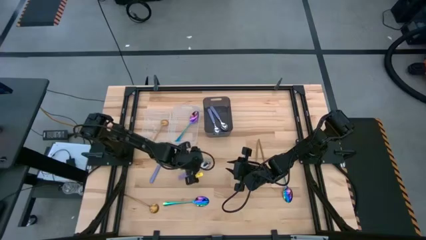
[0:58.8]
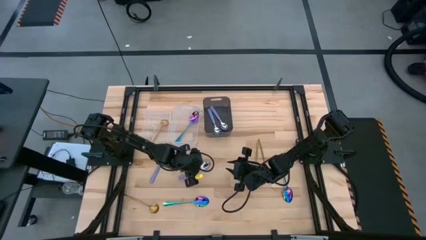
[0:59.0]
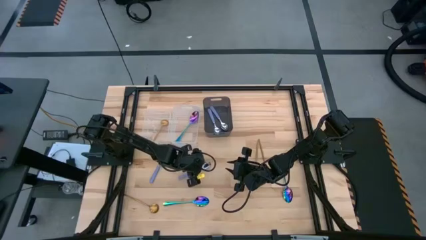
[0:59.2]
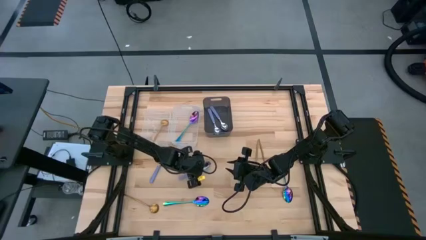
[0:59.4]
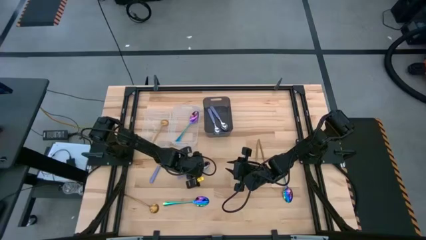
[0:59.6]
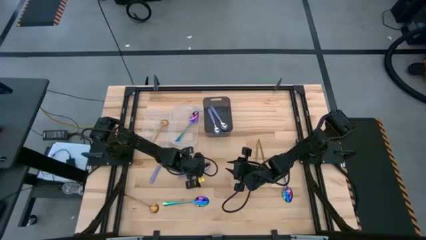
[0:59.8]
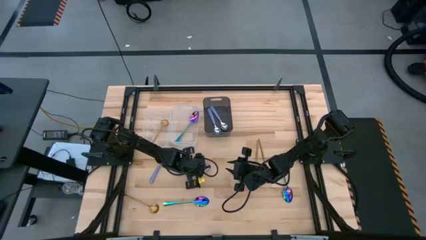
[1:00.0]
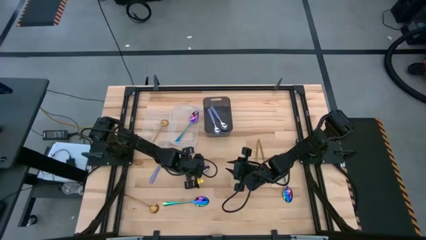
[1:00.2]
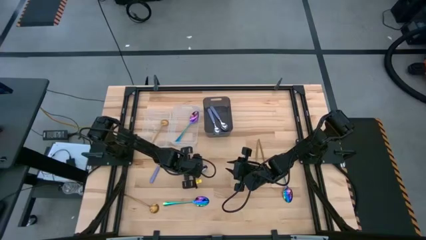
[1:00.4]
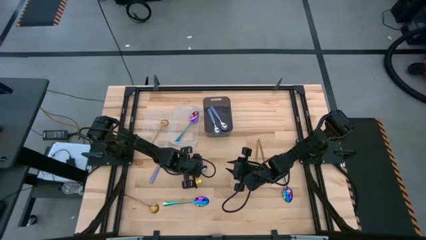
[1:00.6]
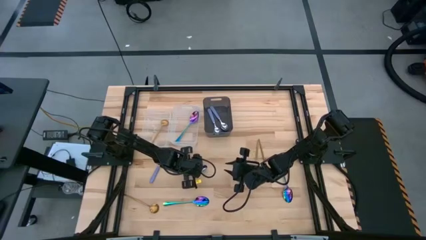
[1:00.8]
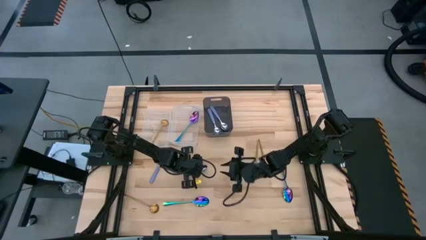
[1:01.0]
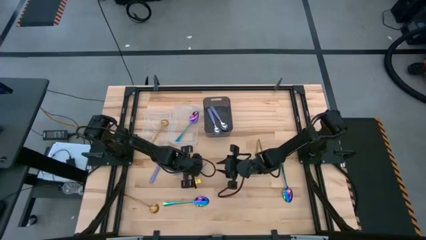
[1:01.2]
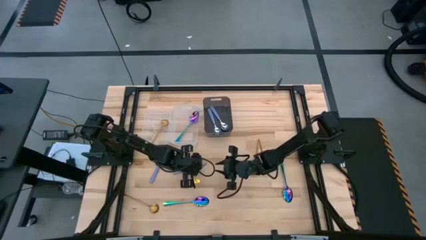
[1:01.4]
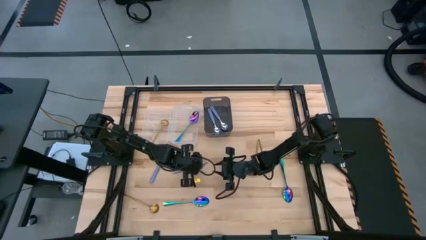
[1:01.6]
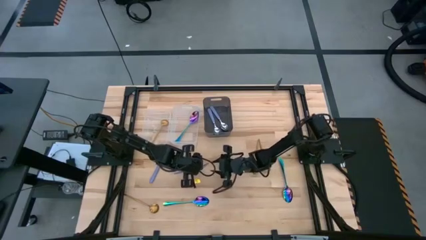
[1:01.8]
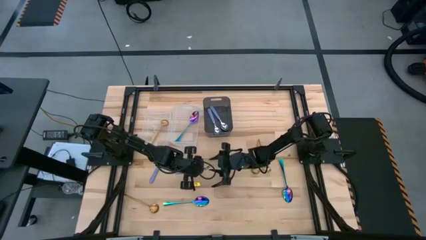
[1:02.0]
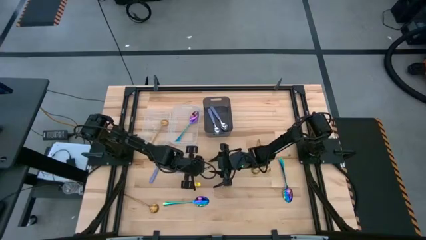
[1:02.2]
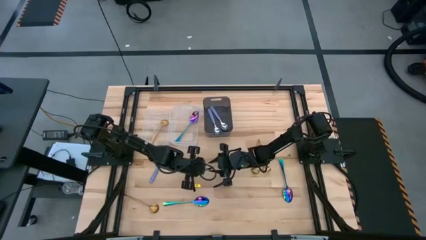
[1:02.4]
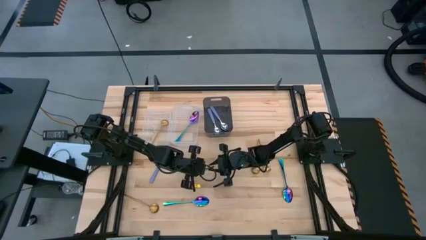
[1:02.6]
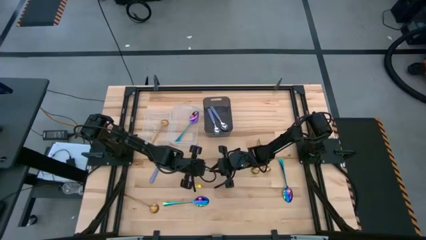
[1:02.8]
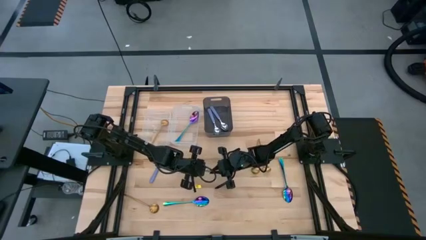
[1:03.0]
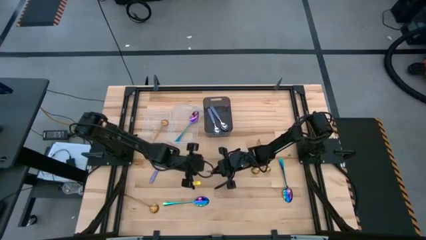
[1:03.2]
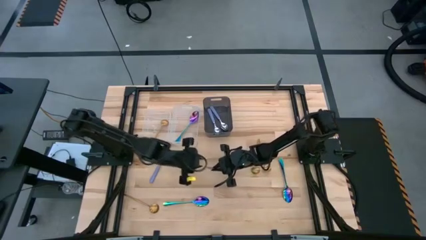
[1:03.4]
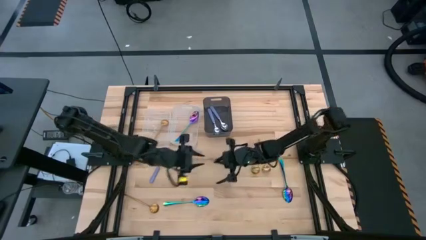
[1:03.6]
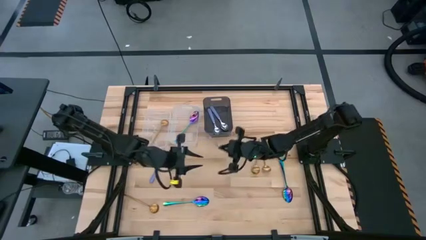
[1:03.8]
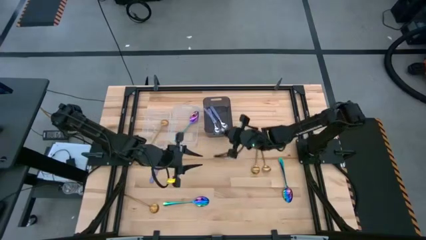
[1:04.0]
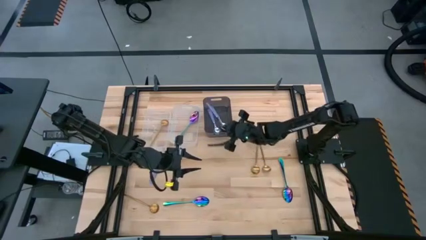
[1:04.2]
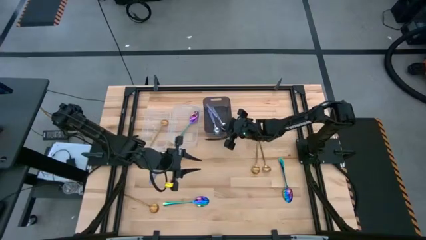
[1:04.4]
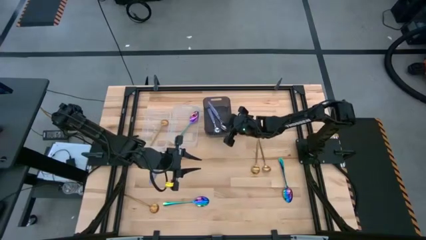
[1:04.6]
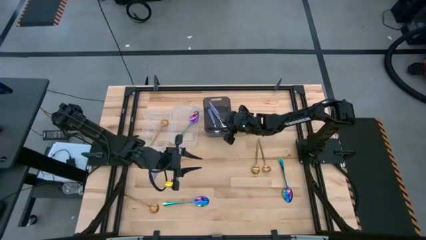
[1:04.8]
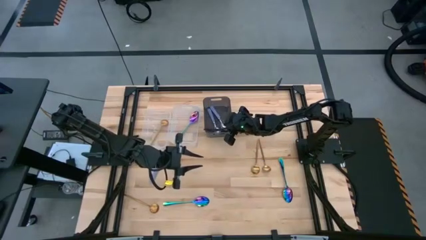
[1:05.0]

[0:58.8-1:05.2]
Task: Sort silverware by color (type)
Put the purple spoon into the black transparent bin

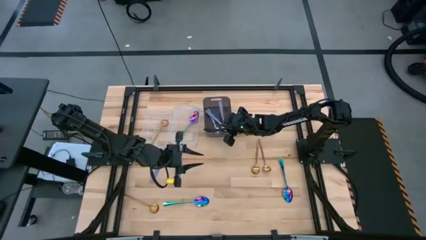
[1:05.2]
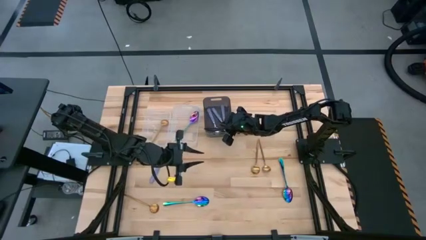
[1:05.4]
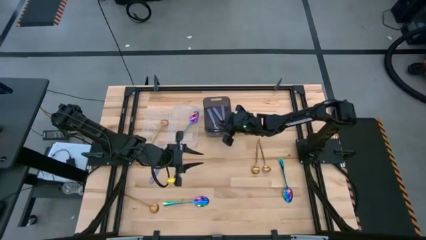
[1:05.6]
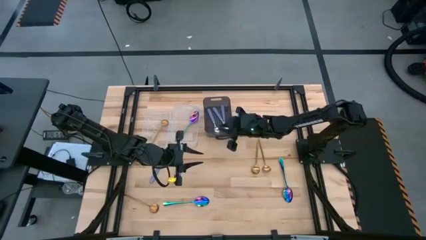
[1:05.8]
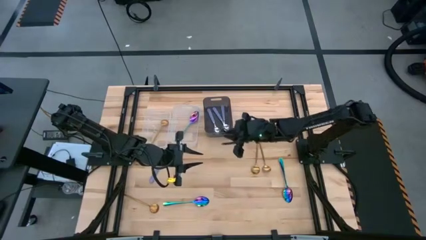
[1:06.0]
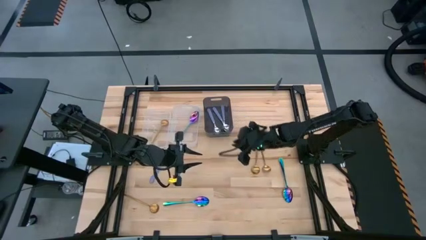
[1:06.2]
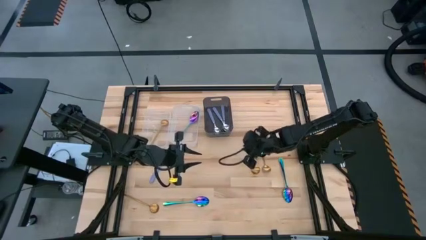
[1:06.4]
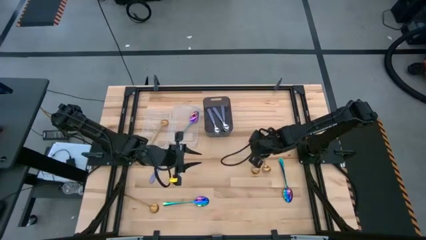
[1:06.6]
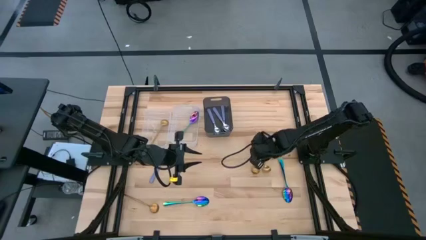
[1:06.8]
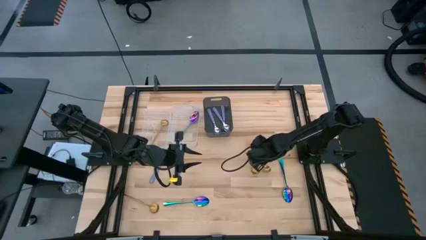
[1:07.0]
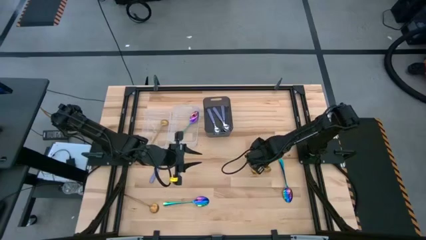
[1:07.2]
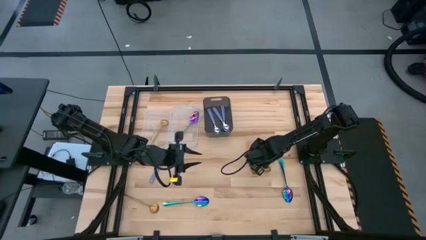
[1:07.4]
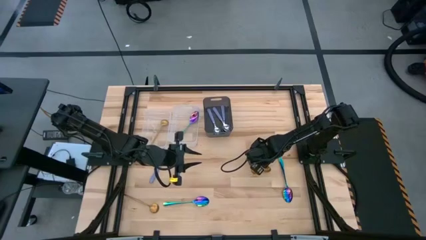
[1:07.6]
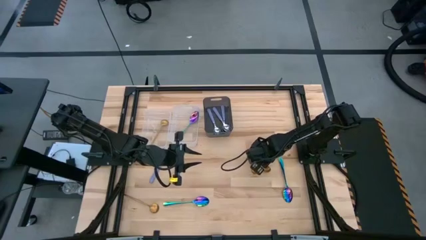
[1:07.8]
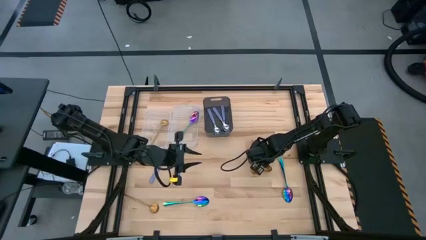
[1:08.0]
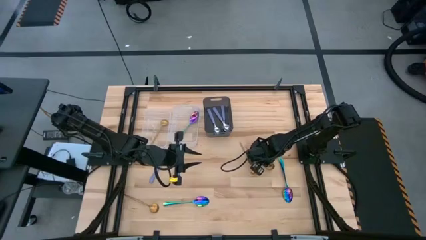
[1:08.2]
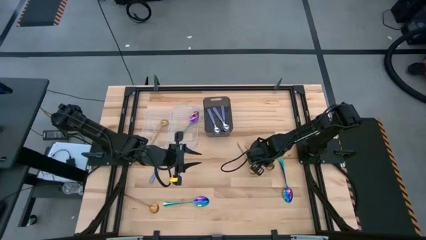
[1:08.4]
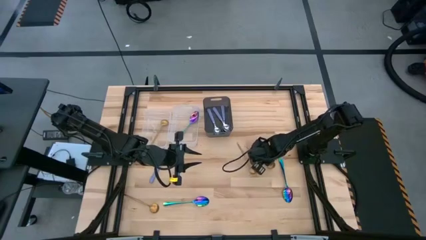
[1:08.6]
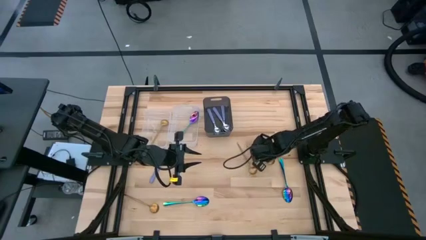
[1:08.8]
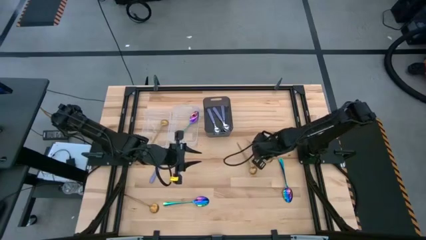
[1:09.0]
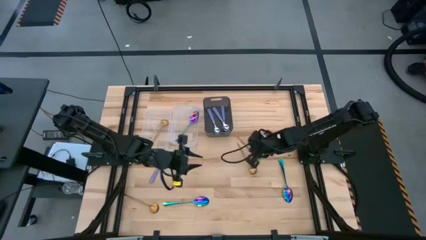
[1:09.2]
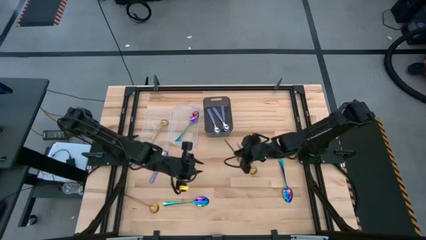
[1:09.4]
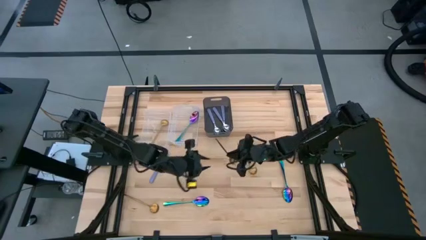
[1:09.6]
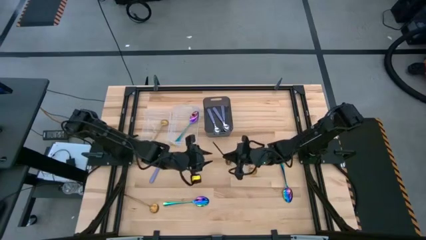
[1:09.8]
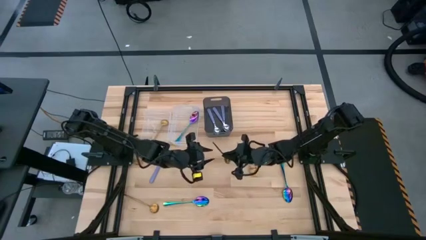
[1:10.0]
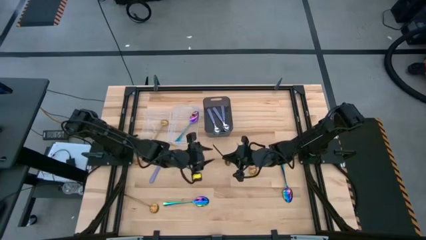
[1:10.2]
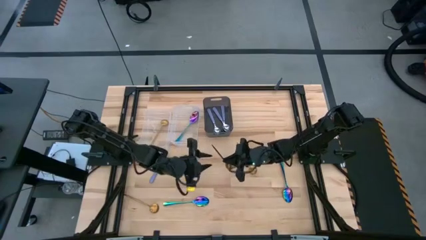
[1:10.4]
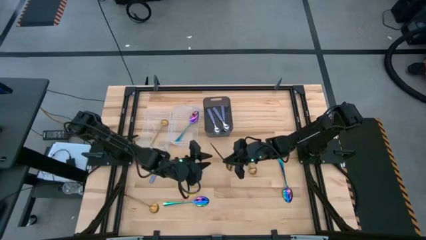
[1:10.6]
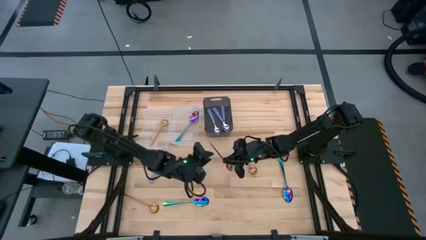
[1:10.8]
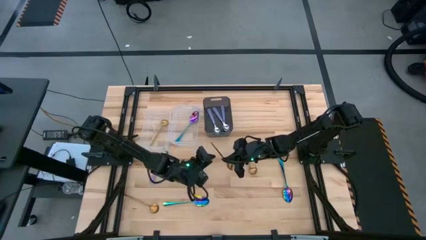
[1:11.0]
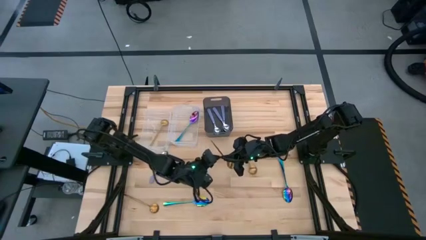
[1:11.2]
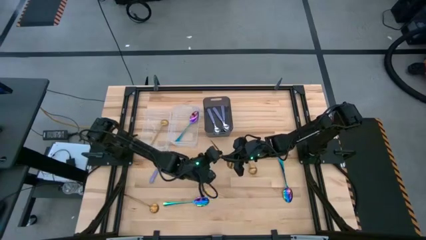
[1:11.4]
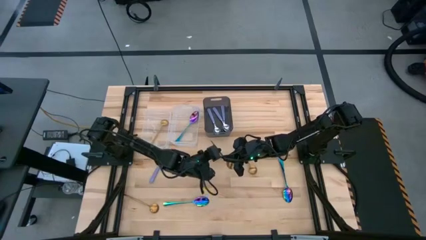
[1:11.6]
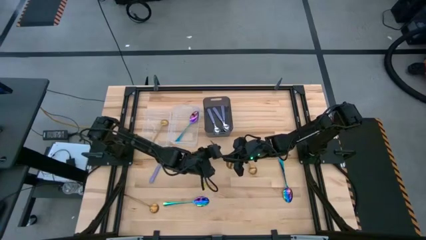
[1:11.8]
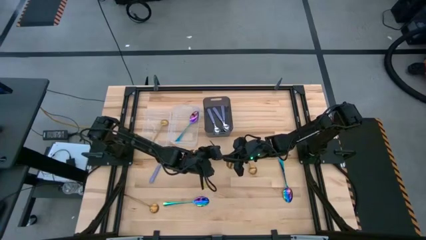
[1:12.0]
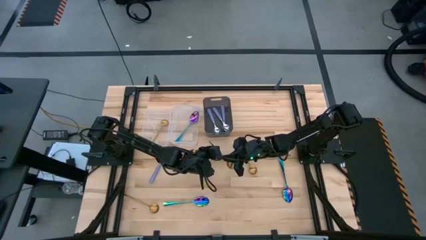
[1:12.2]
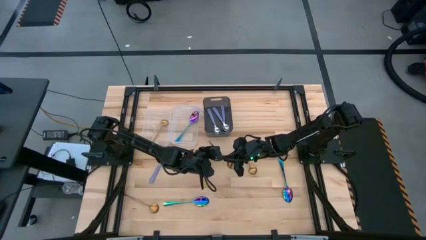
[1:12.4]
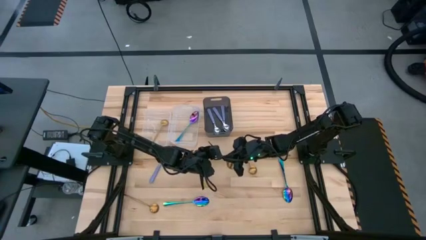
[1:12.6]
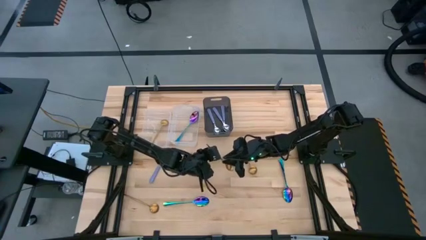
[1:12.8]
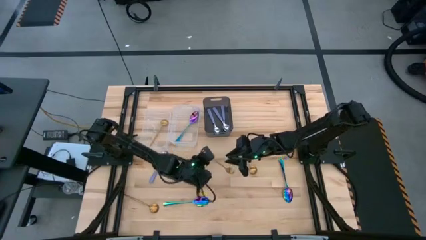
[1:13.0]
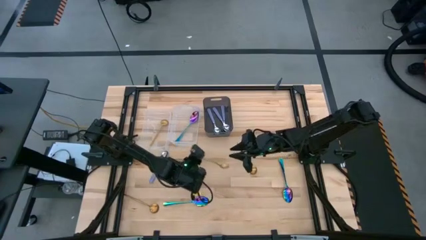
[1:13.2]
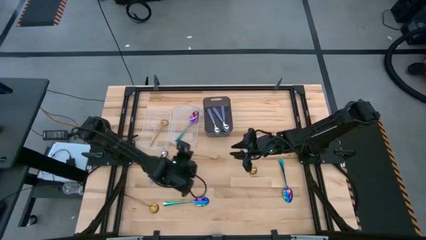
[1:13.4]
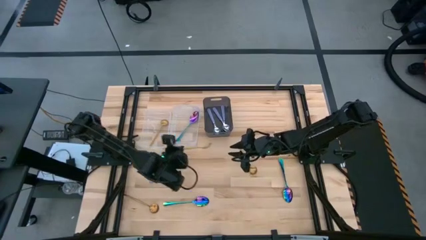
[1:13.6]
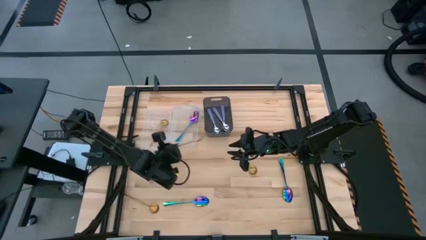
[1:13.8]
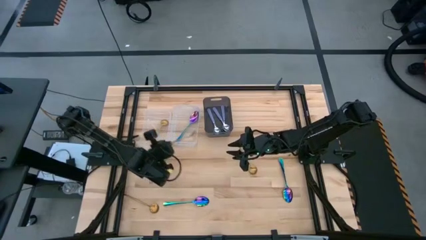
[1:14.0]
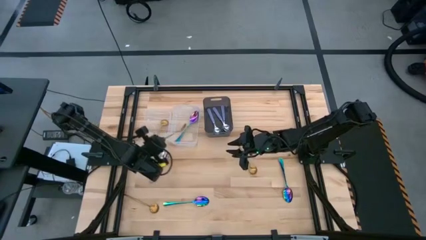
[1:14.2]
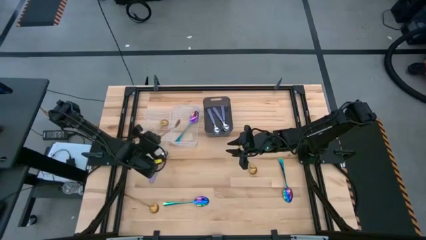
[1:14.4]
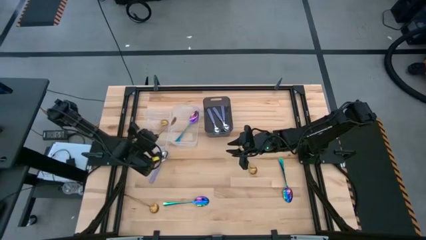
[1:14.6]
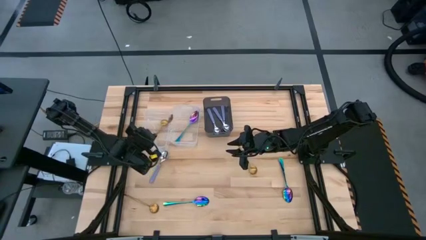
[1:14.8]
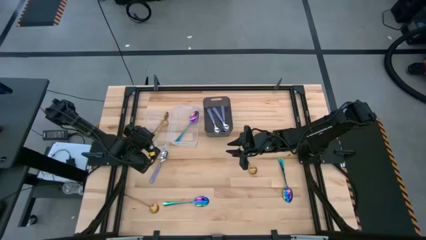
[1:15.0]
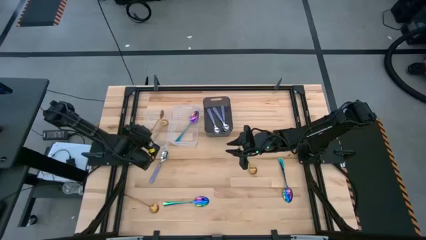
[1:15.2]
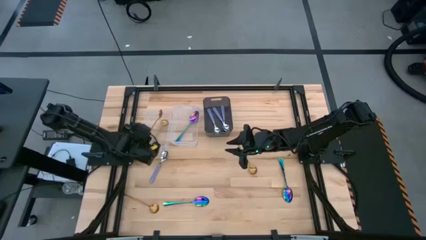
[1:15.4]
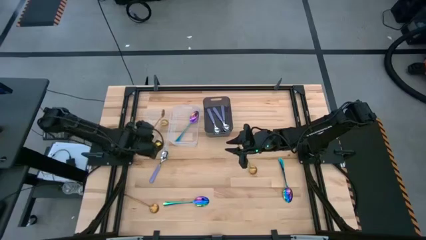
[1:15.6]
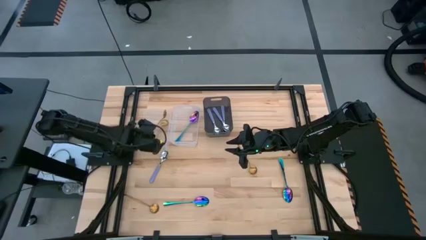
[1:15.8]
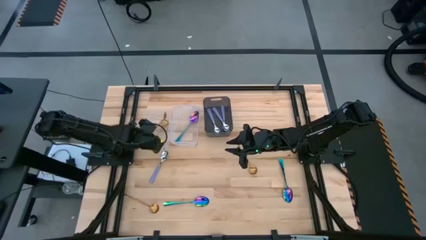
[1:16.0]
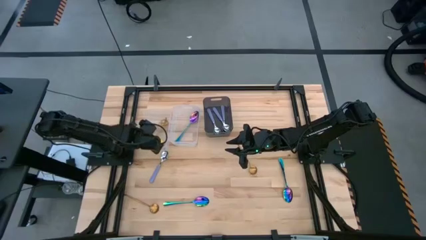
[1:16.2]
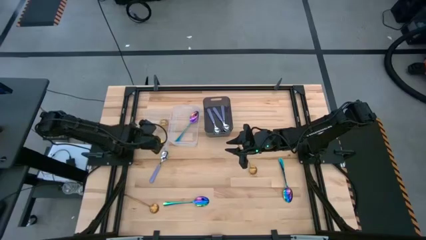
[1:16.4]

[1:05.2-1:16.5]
Put the gold spoon into the left transparent bin
